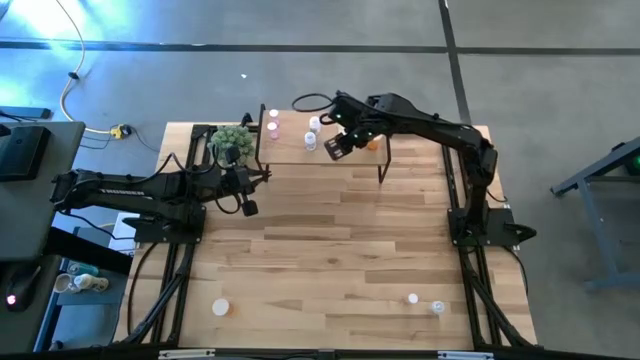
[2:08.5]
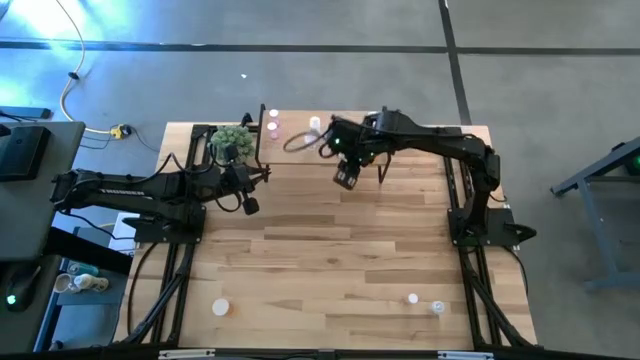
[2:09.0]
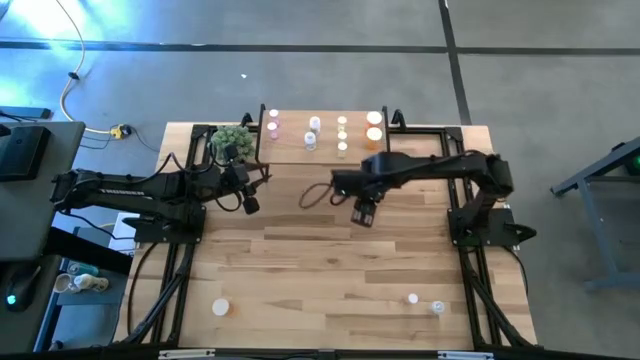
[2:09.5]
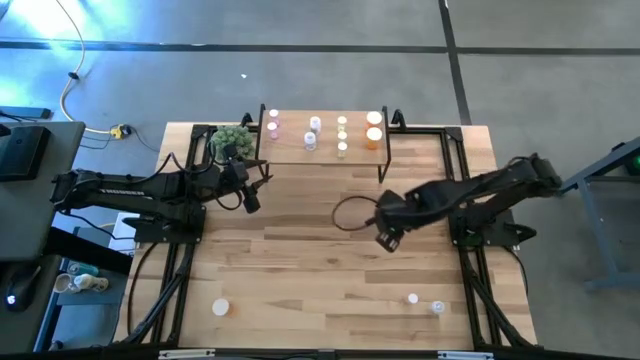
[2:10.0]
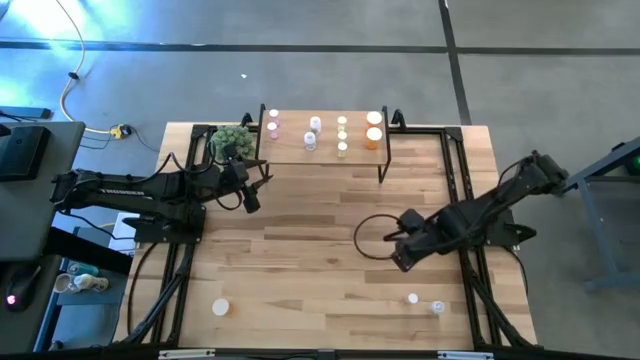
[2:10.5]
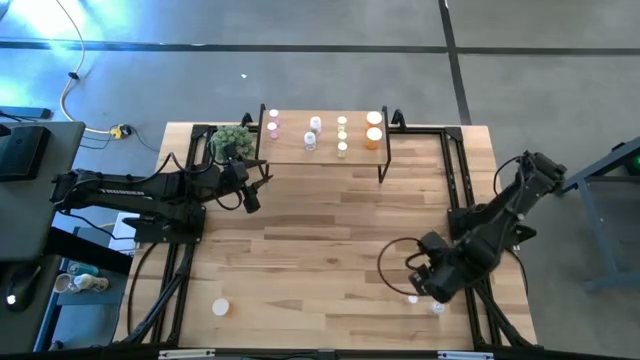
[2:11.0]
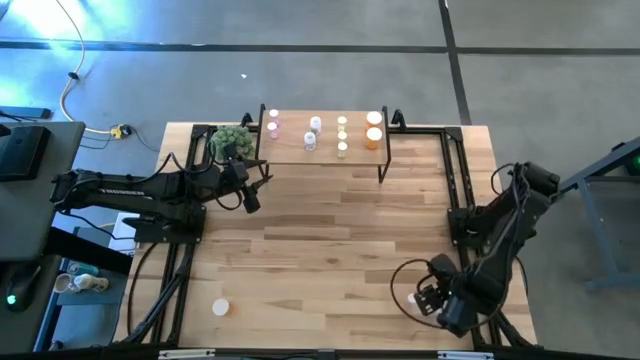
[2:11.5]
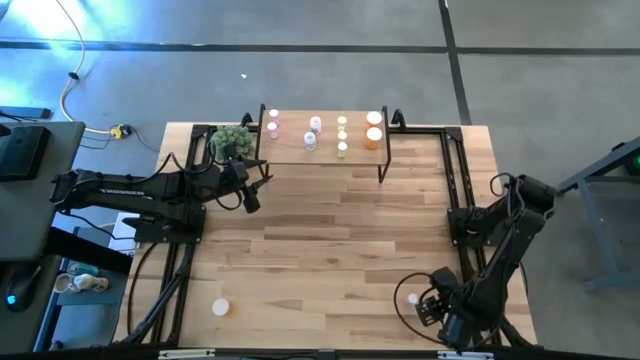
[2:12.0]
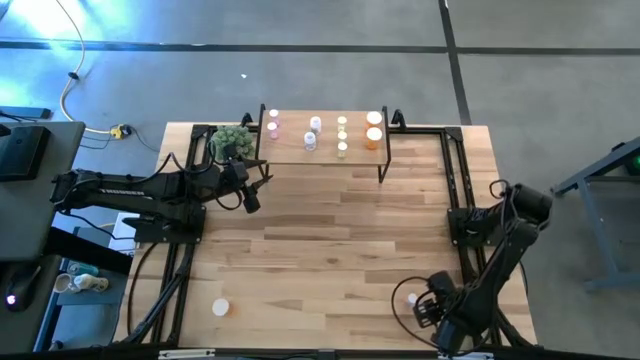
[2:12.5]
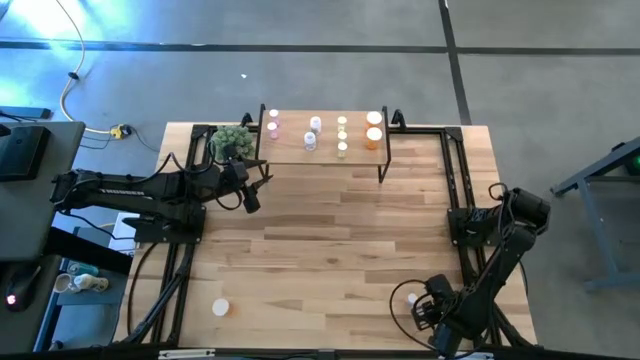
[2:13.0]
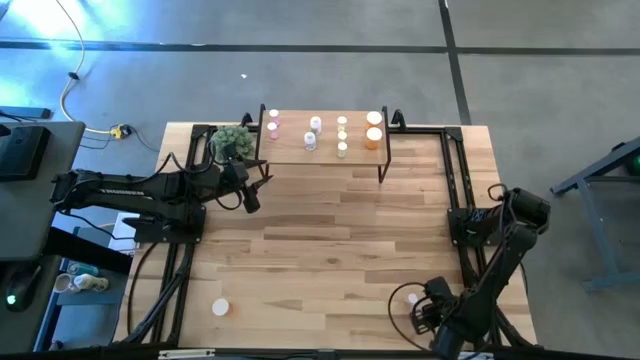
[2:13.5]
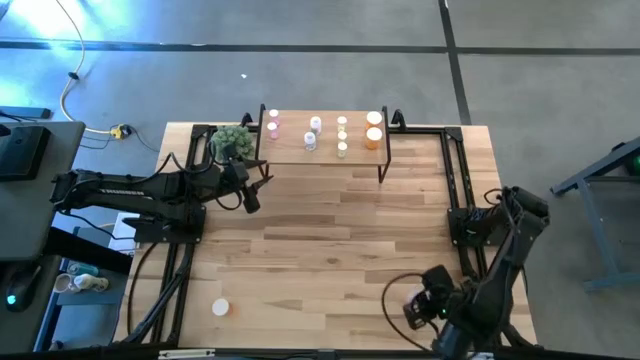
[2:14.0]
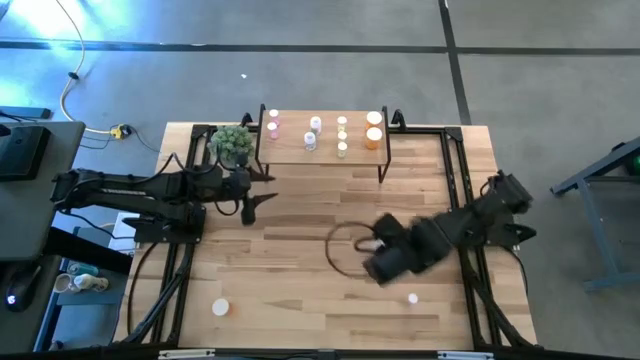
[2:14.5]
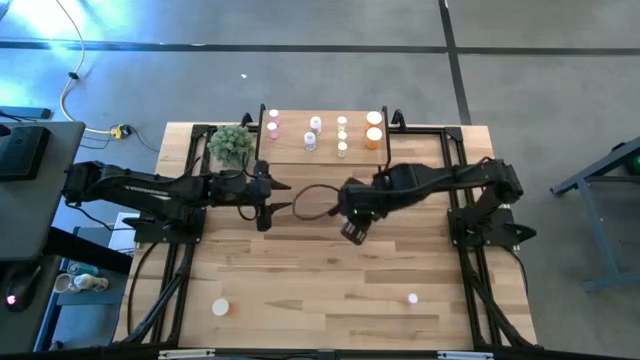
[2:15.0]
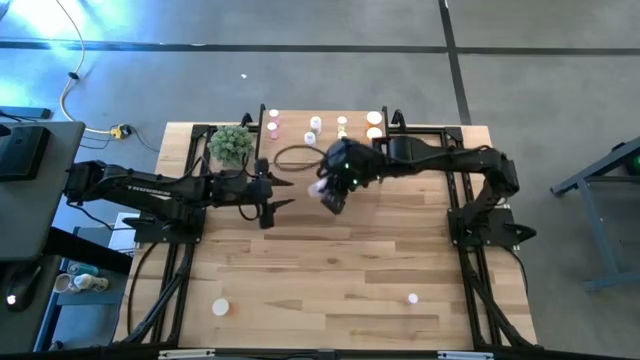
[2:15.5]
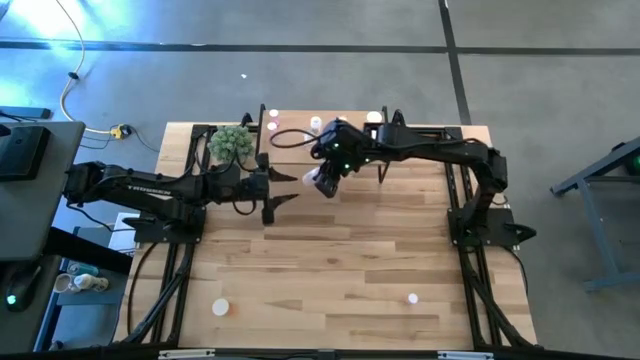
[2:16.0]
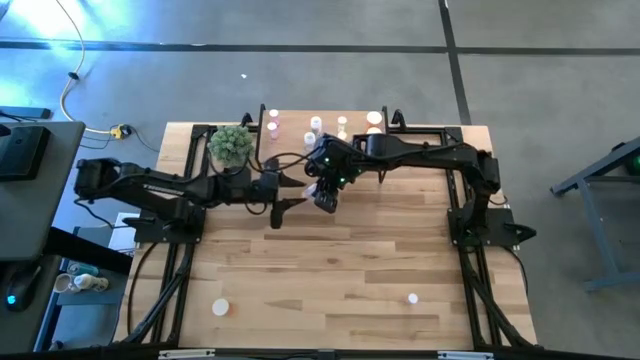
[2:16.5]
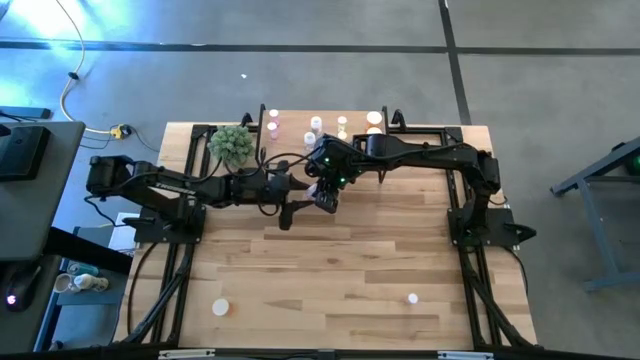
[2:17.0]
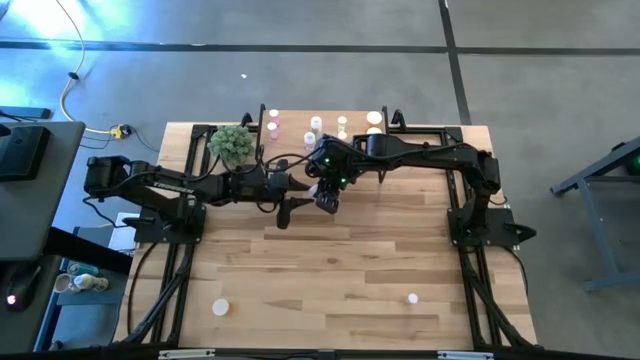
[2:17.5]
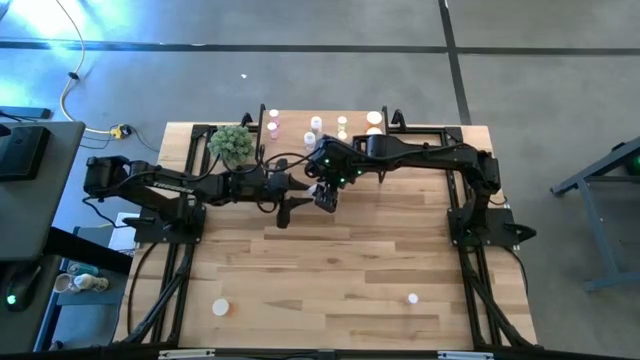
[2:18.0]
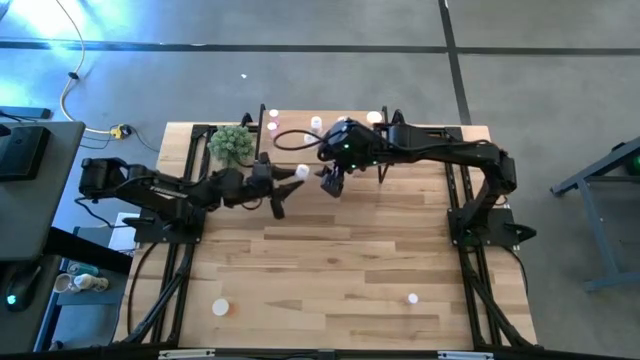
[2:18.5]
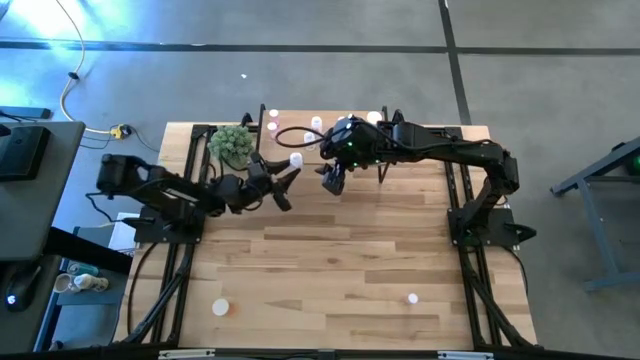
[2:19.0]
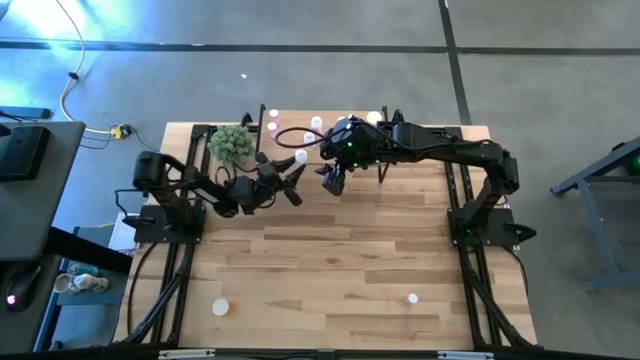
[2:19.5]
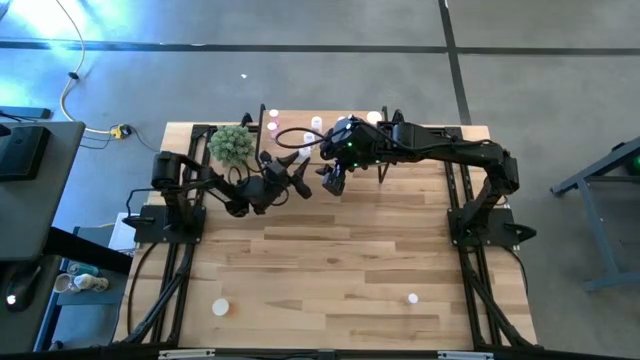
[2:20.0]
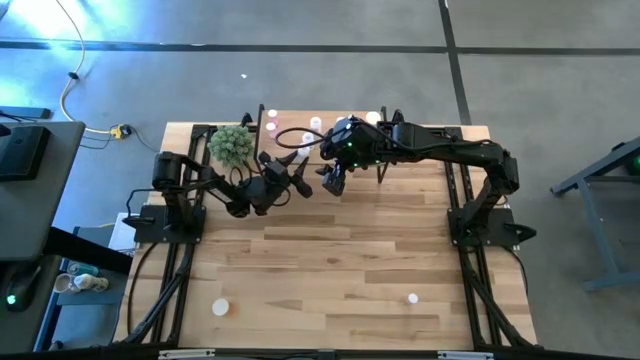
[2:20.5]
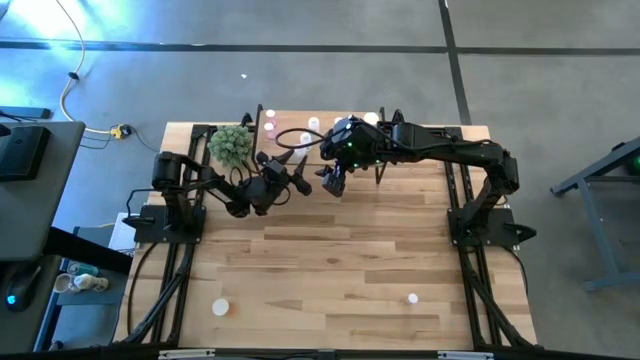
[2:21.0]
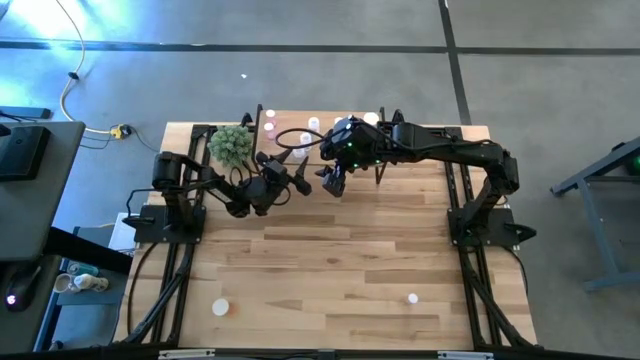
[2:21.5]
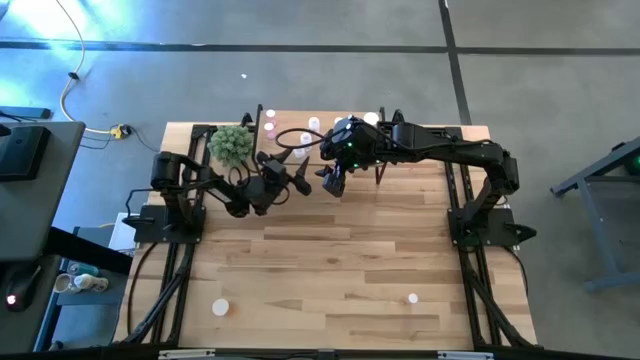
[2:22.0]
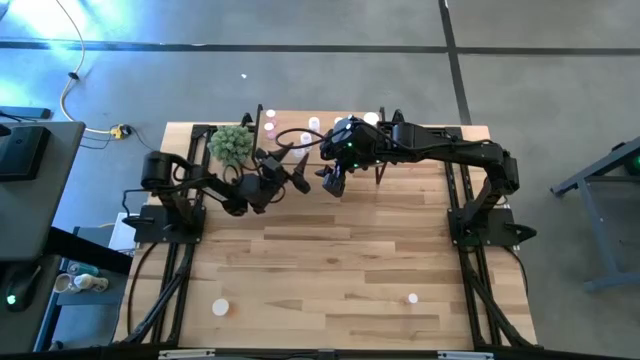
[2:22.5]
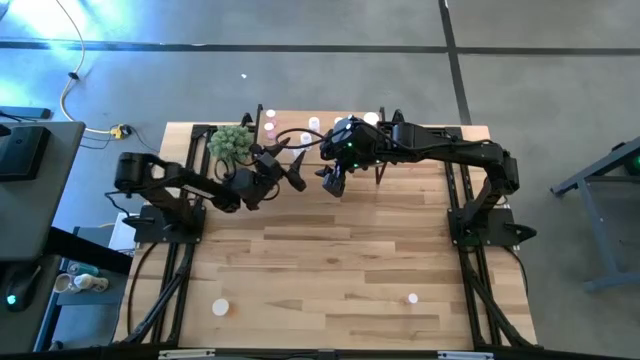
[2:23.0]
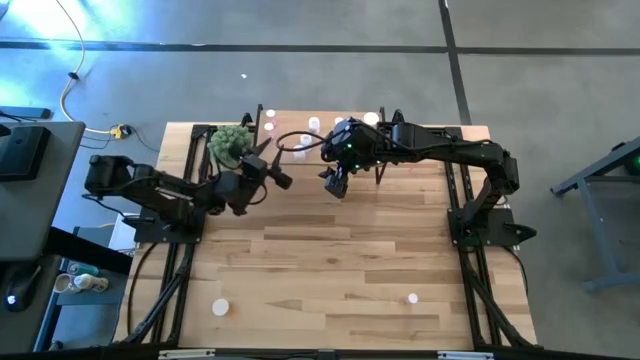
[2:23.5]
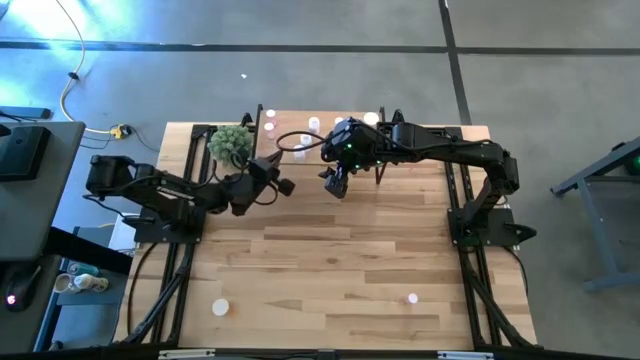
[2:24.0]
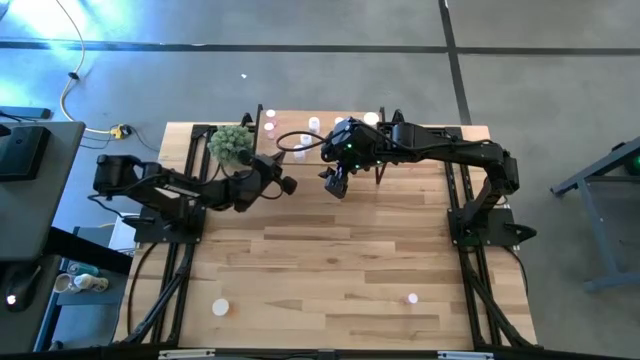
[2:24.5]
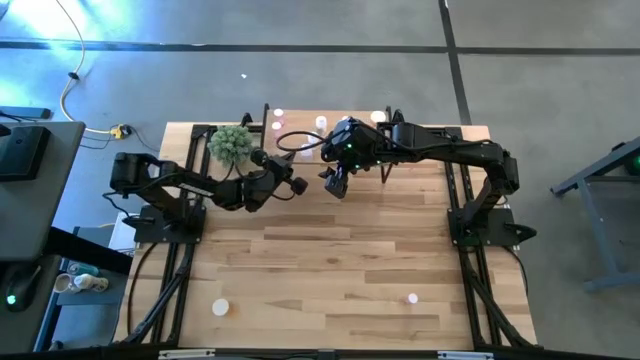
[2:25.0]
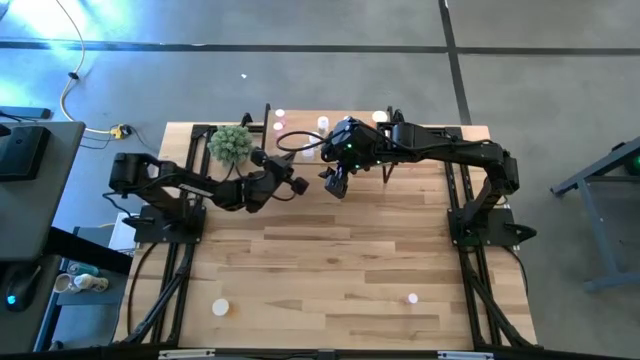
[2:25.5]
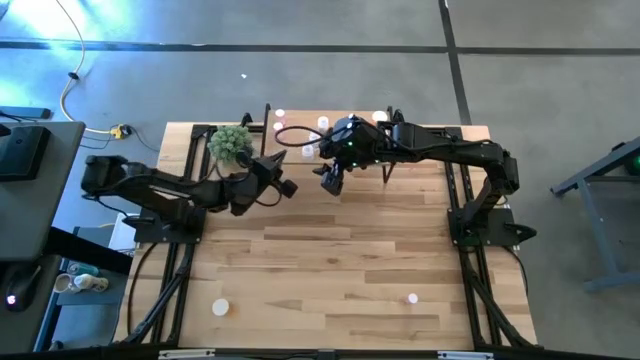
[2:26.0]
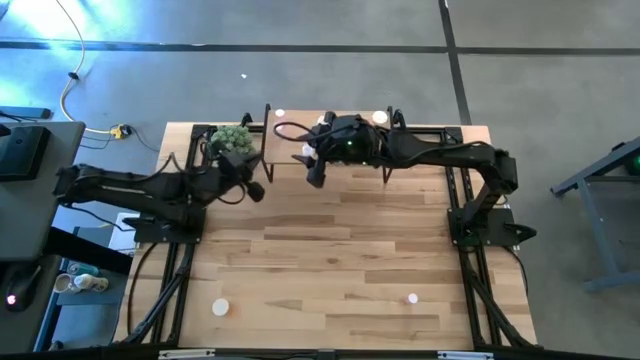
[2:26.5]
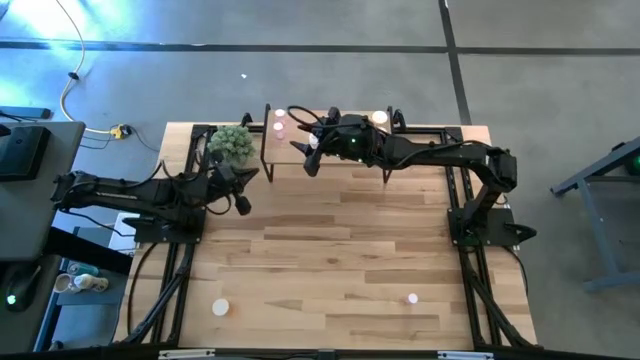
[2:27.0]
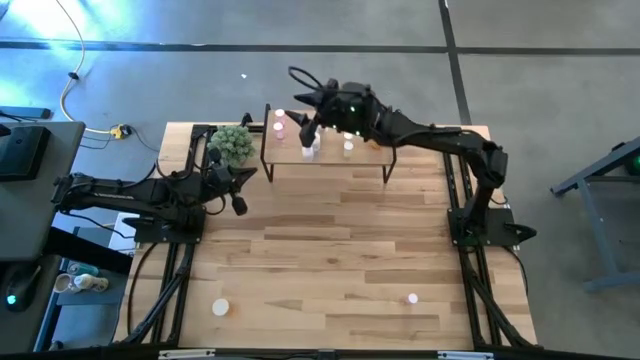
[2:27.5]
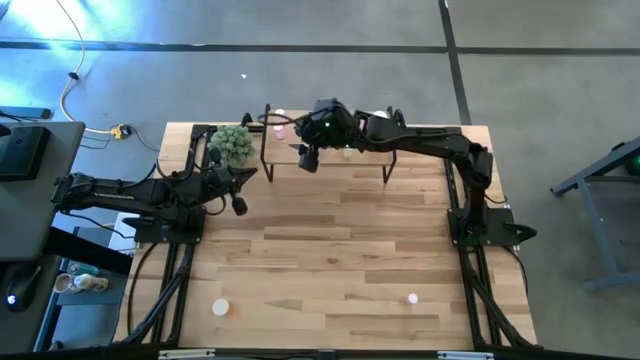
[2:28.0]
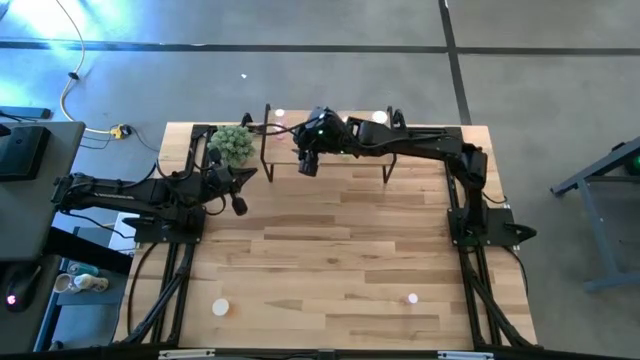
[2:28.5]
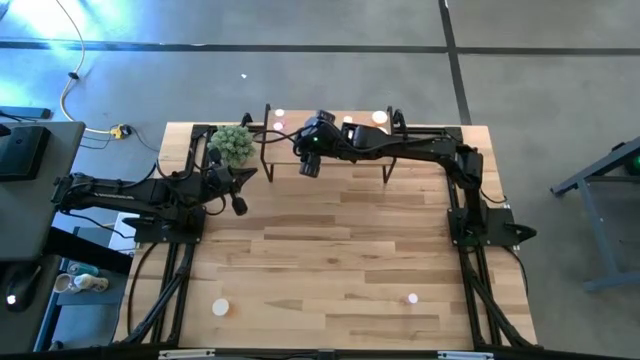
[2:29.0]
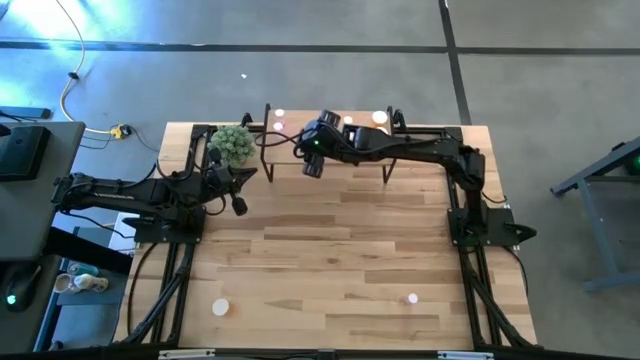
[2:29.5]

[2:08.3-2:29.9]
Task: Pick and place medicine bottles onto shelf by color
Put the transparent pill bottle on the shelf aligned with the other transparent pill bottles

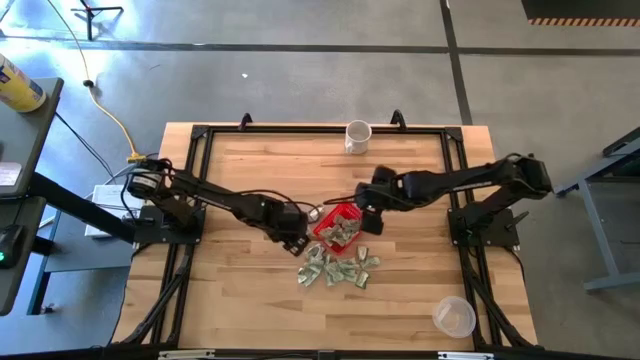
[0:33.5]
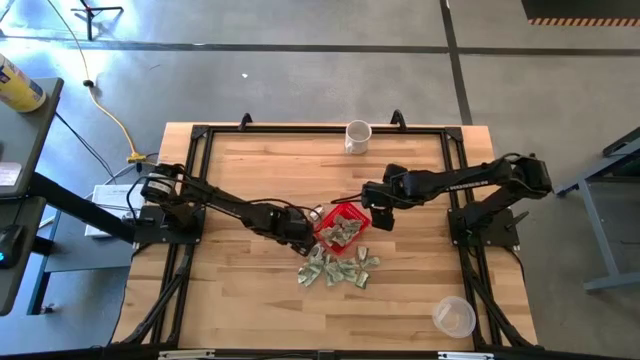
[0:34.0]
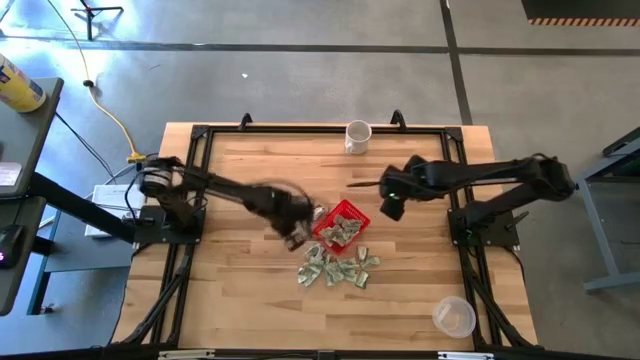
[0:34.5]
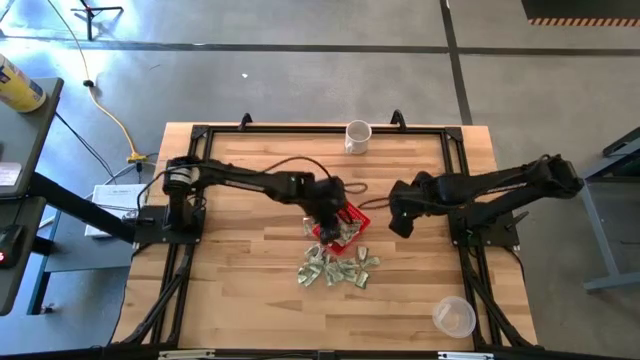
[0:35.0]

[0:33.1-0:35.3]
Task: Pick and place items into bin
Put the white stevia packet into the red bin
